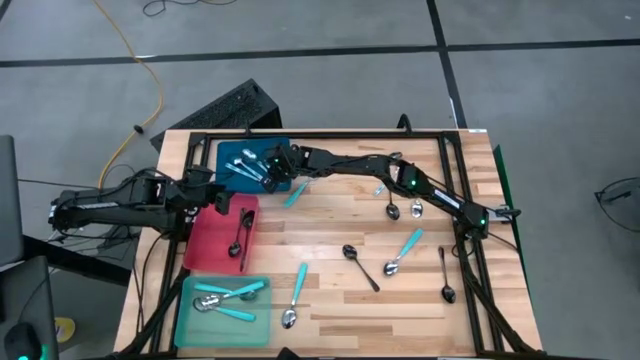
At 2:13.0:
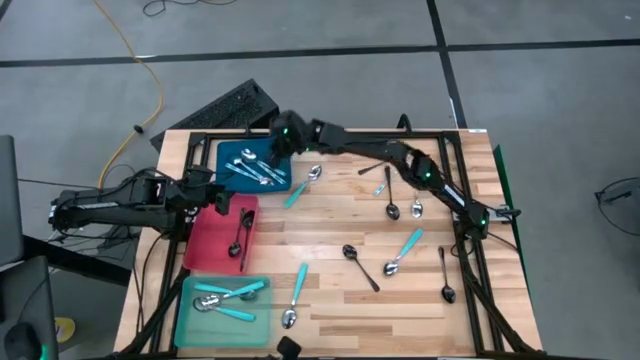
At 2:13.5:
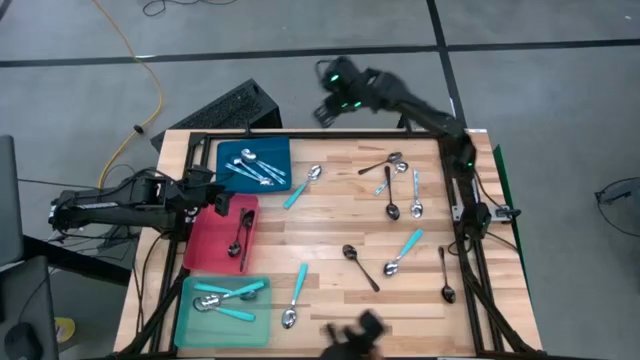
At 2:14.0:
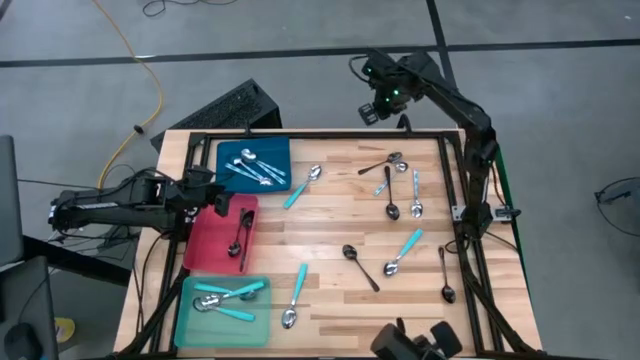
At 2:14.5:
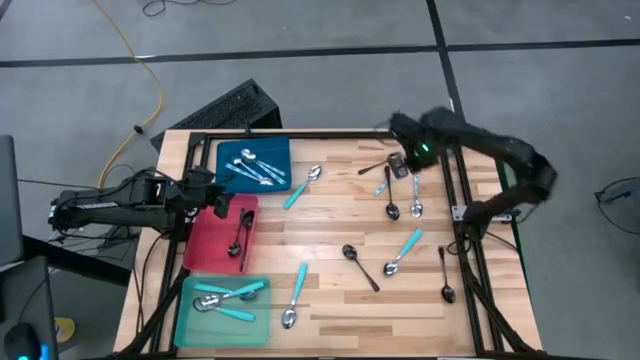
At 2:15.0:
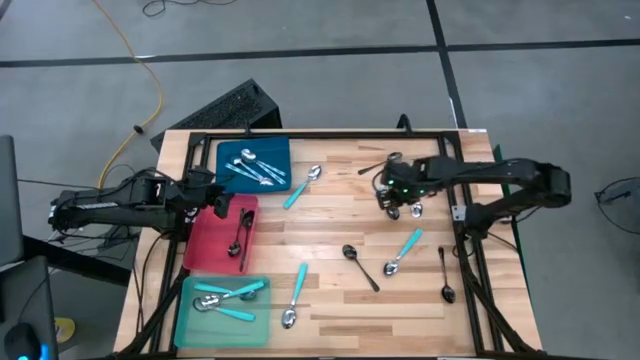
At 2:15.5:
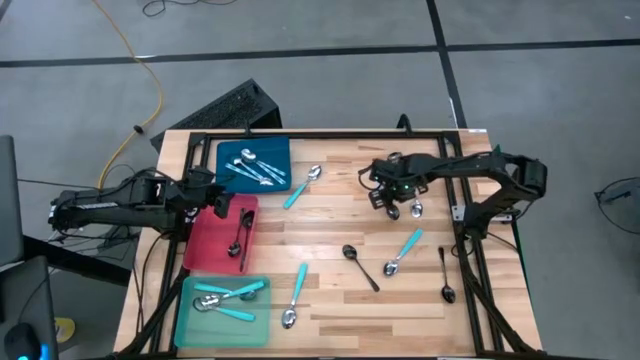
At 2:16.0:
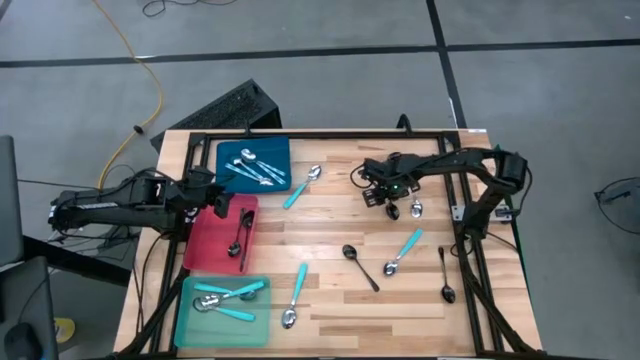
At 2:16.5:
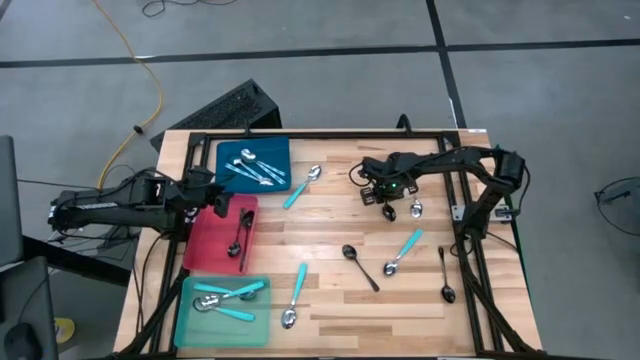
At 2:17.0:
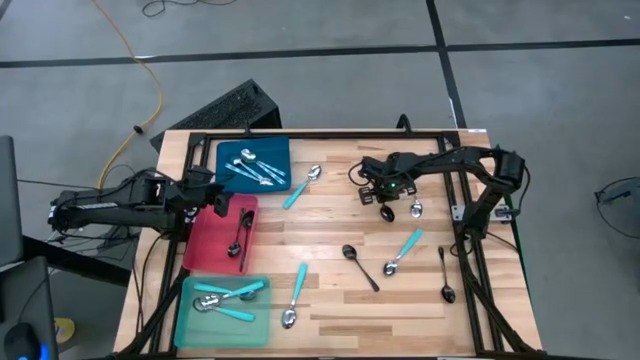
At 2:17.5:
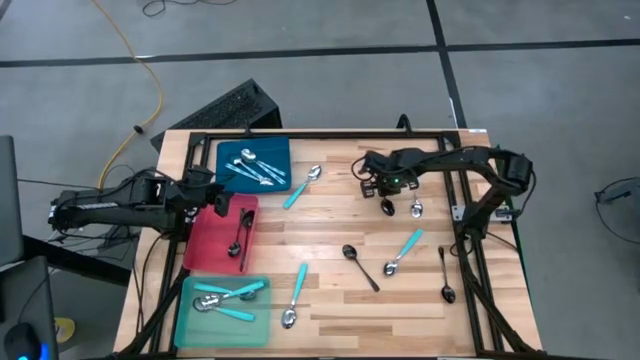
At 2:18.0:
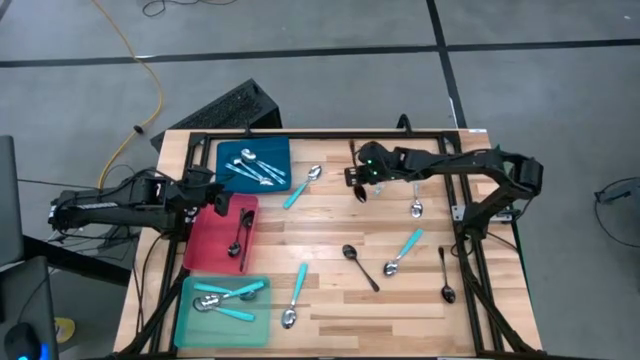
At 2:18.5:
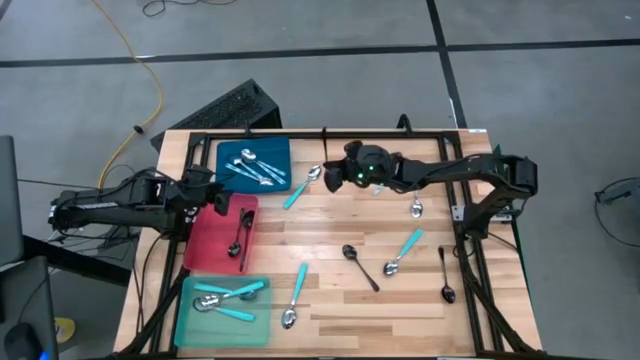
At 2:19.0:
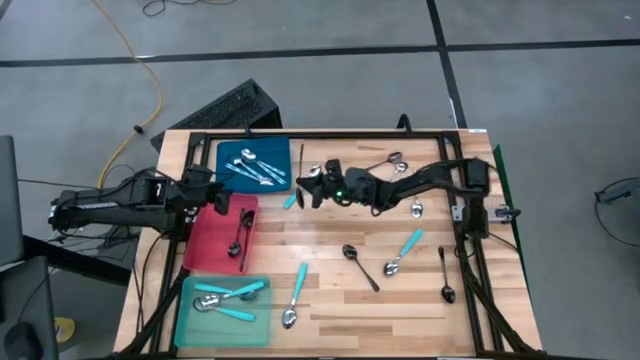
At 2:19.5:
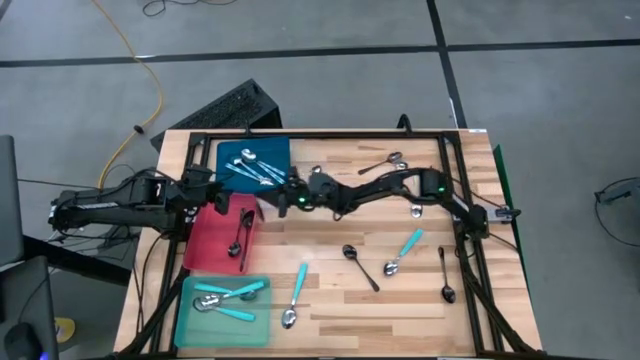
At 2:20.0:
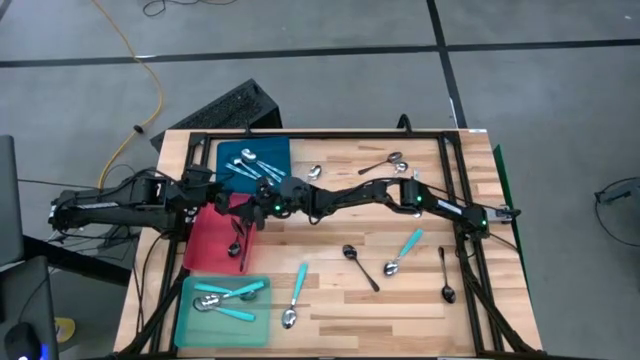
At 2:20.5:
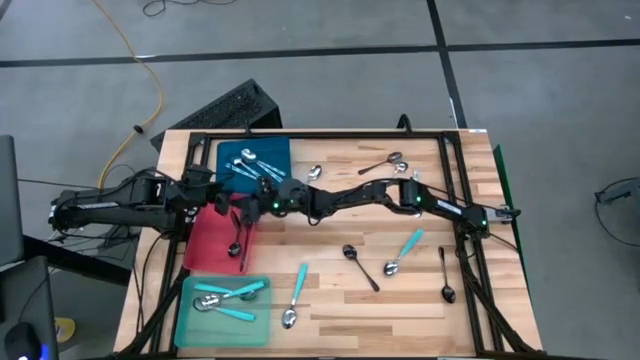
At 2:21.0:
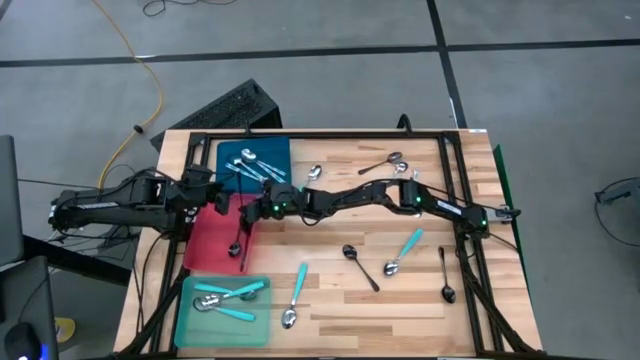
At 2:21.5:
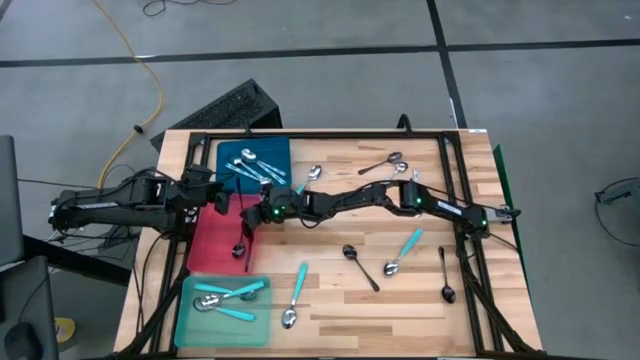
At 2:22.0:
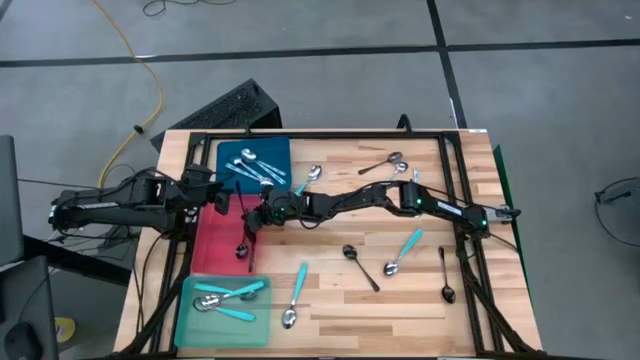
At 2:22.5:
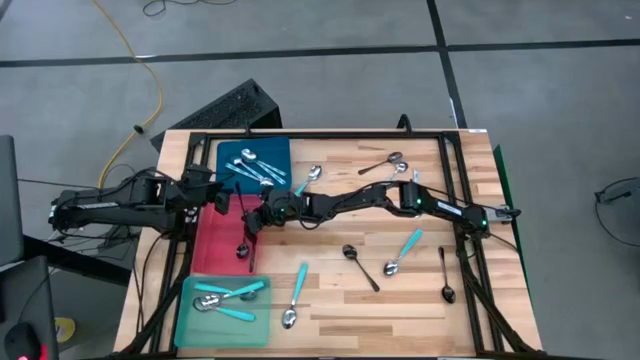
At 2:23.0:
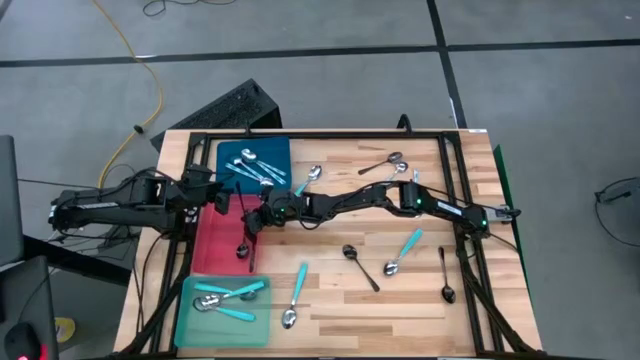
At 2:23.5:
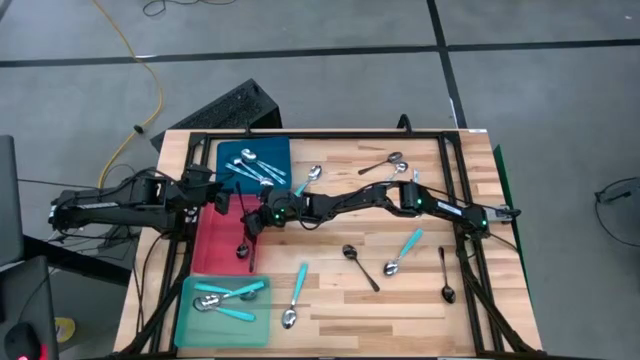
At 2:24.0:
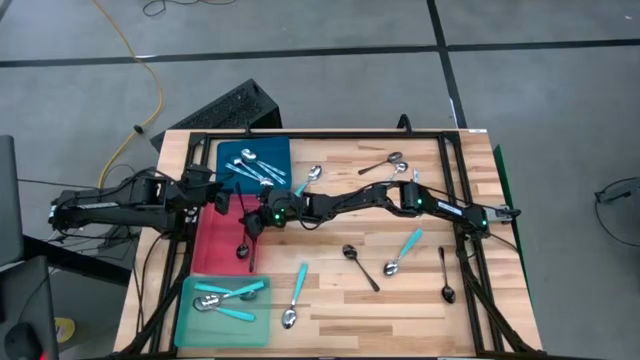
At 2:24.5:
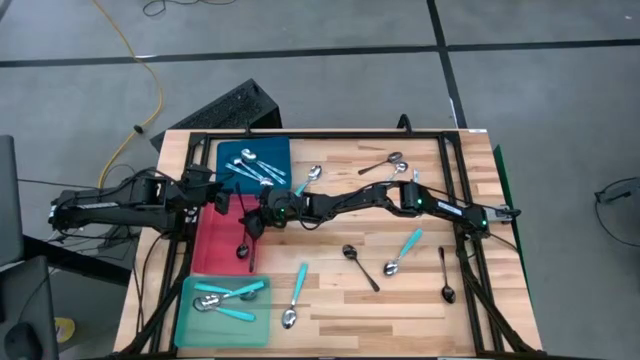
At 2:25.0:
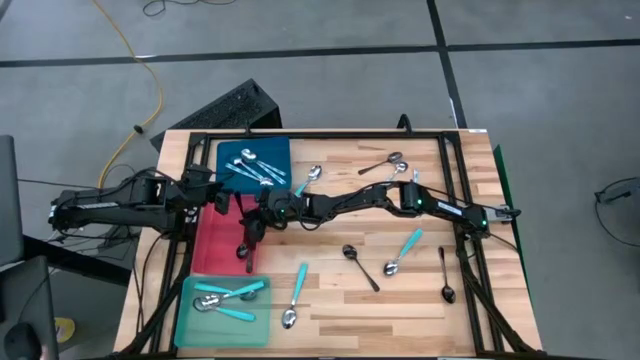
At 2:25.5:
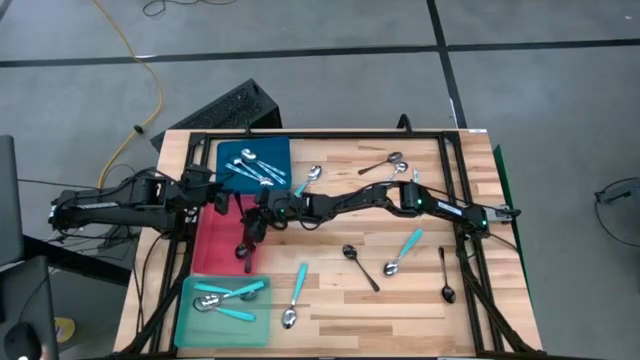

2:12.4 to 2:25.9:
Task: Sort silverware by color (type)
Put the black spoon into the red bin

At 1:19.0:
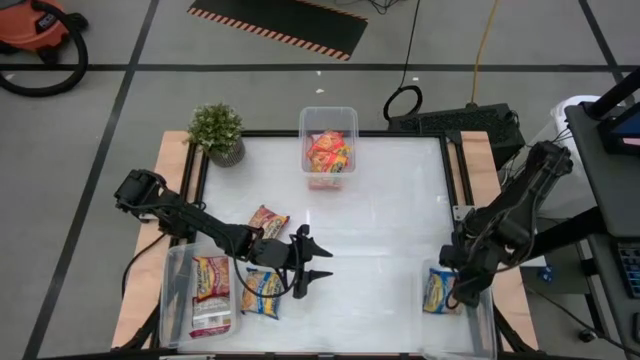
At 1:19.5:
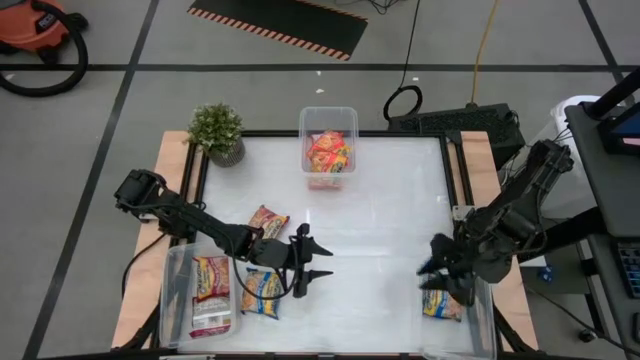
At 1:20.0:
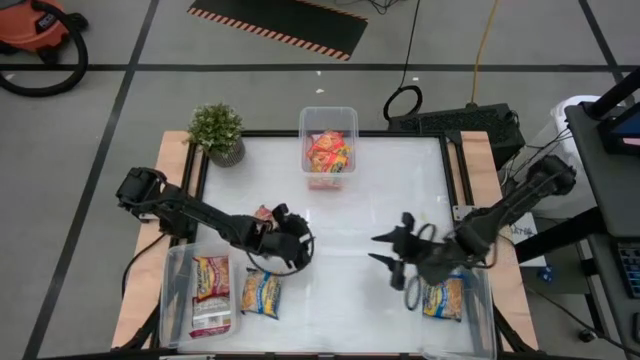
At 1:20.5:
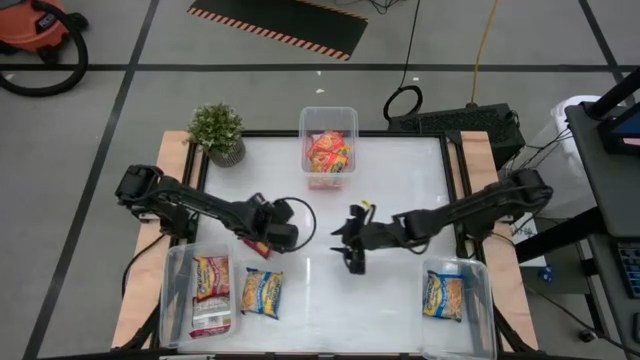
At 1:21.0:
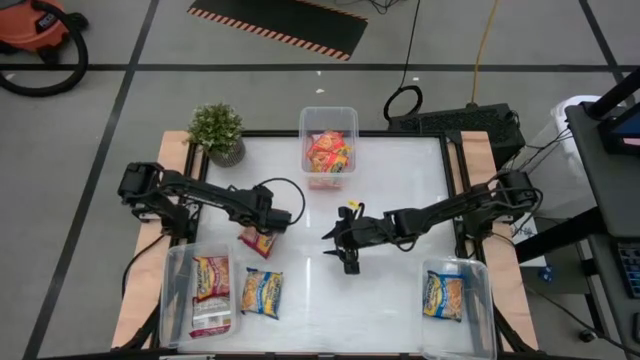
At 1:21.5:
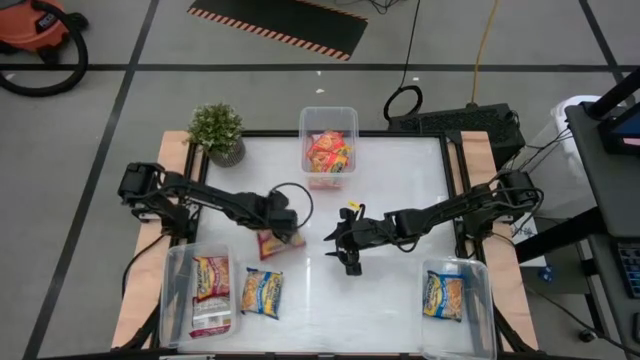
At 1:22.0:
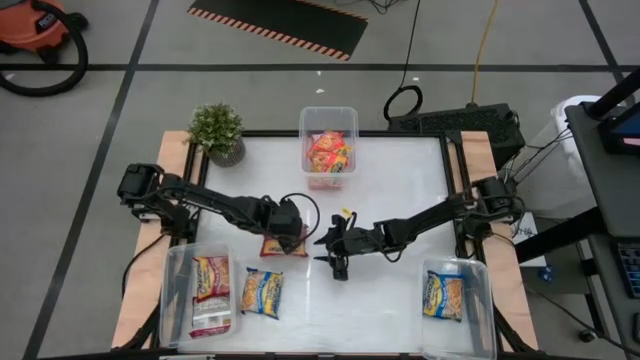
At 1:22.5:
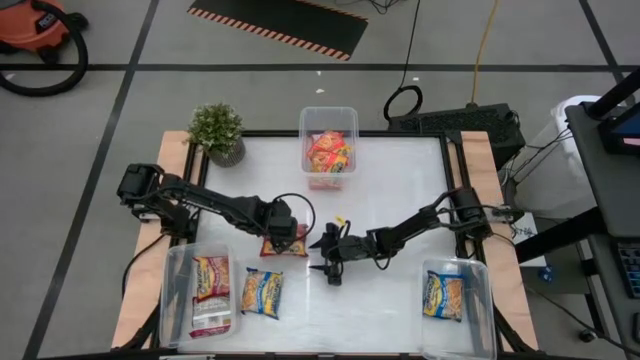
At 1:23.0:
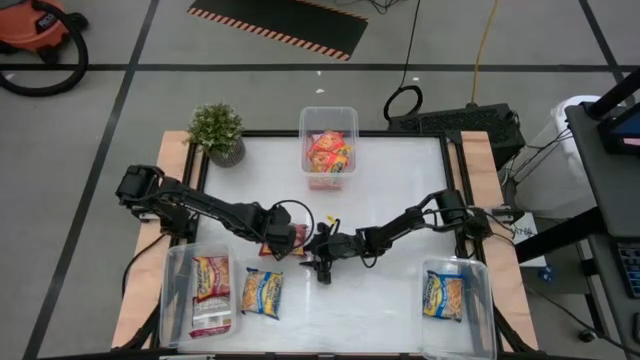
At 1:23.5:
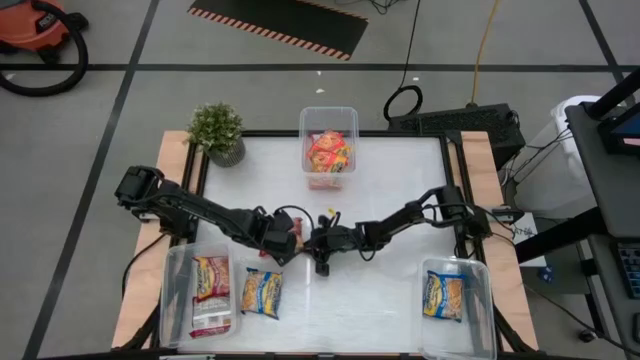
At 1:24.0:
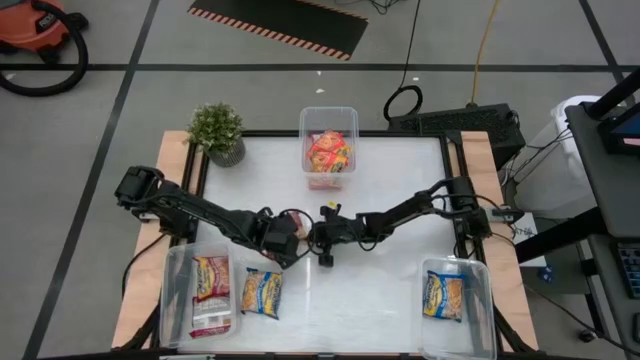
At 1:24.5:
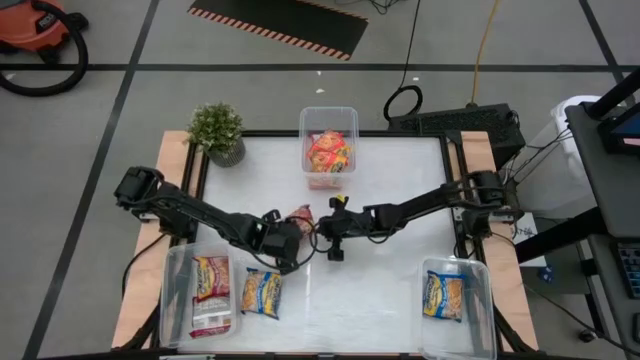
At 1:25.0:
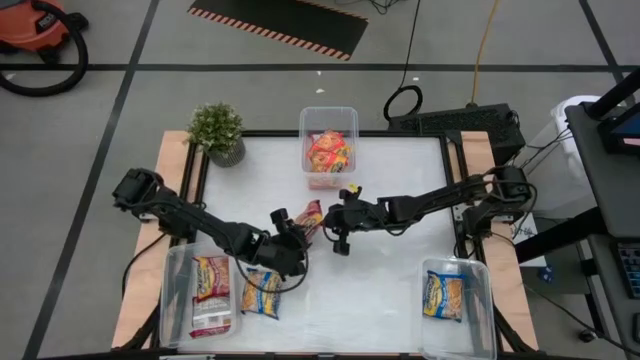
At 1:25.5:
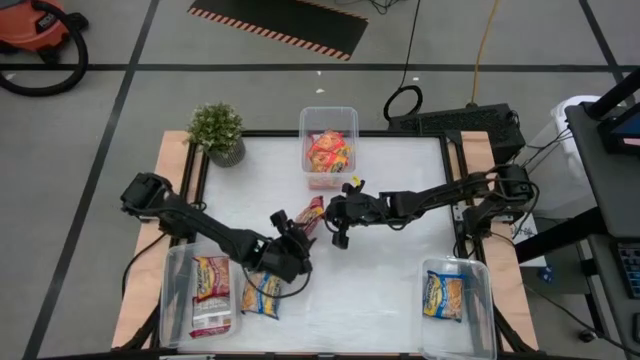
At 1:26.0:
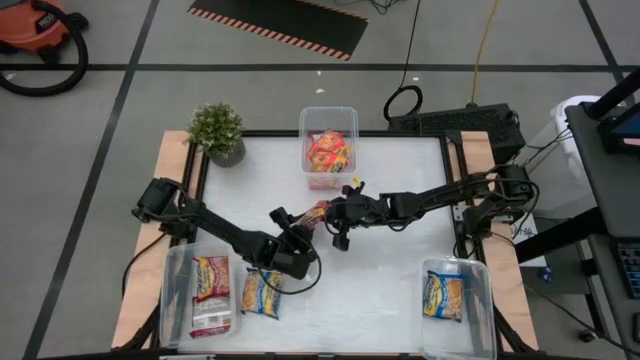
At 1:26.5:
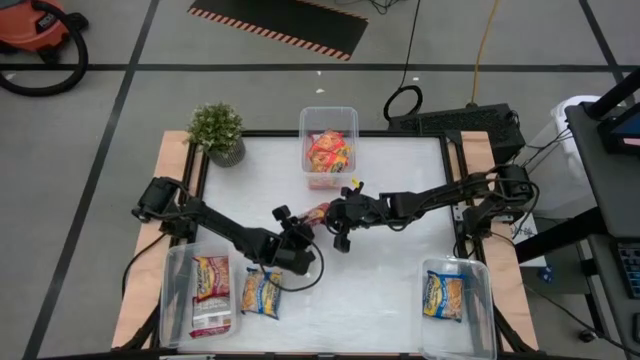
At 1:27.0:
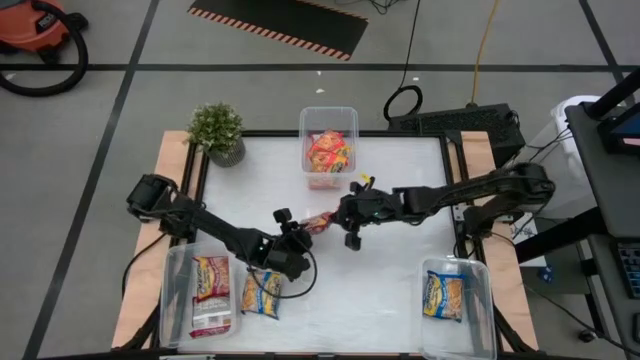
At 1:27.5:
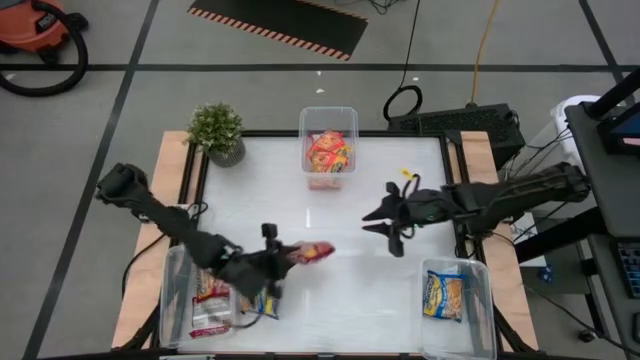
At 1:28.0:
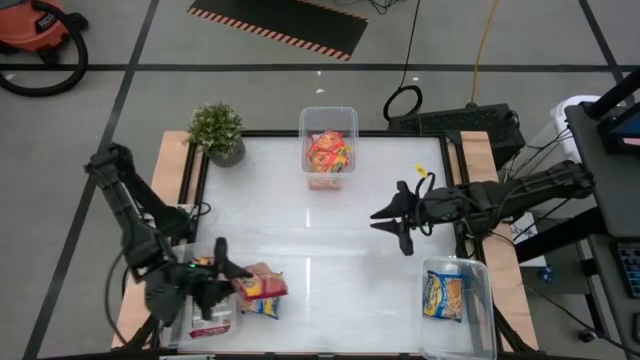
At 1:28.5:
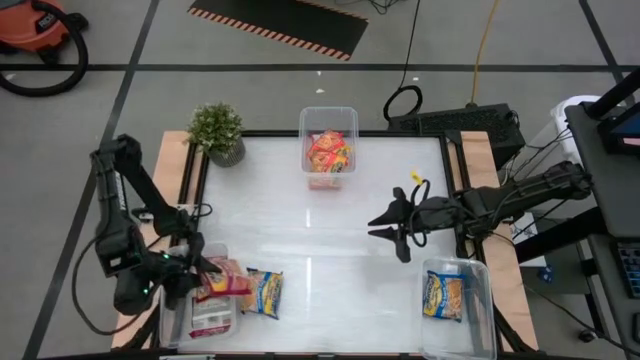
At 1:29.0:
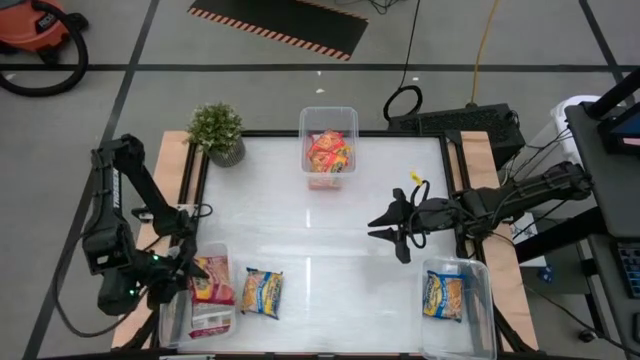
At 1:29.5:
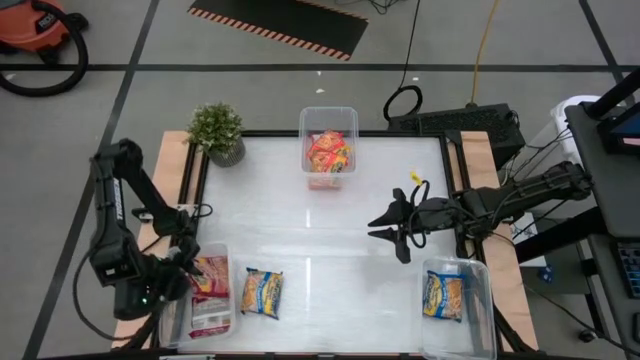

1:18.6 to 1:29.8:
Task: Sort Maruchan noodles
Put the red noodle pack into the bottom left transparent bin
